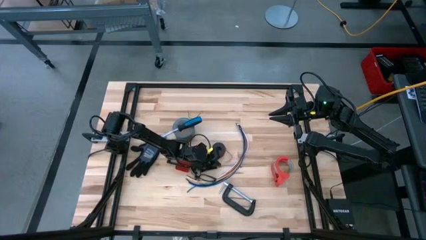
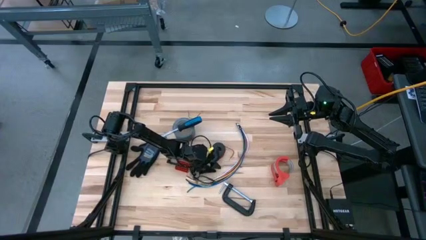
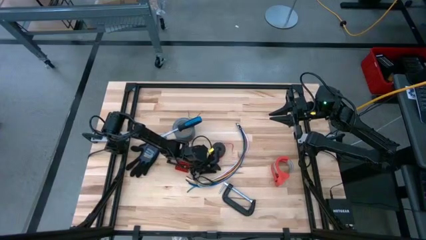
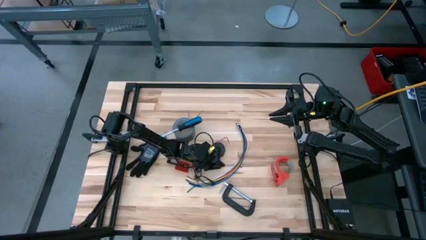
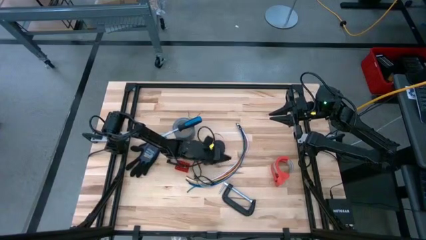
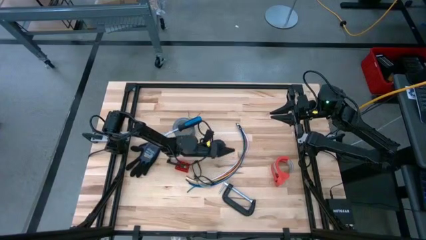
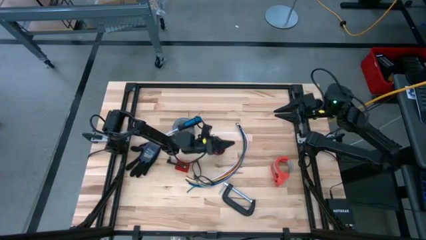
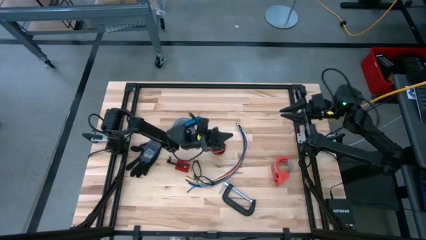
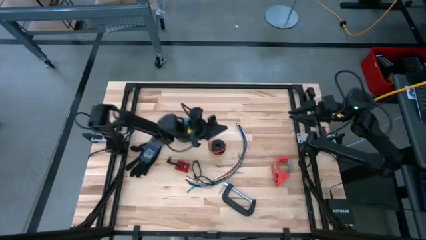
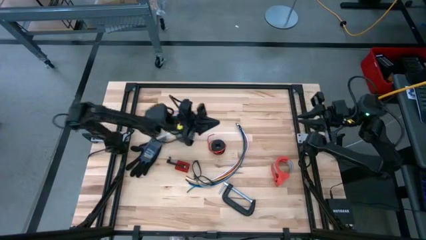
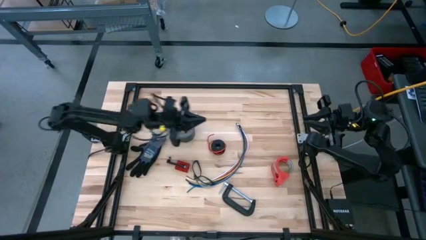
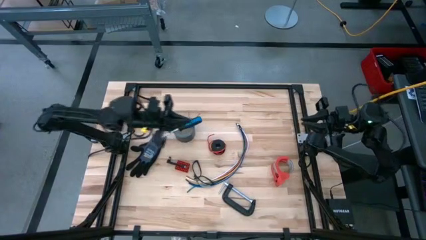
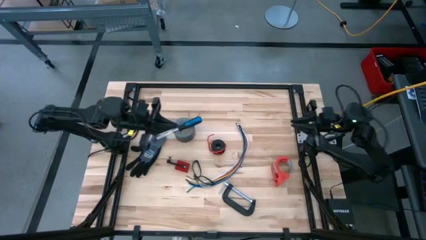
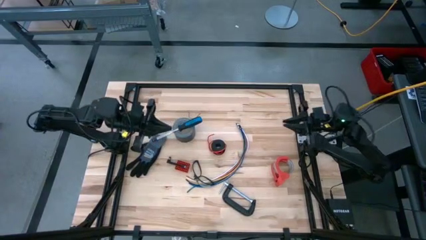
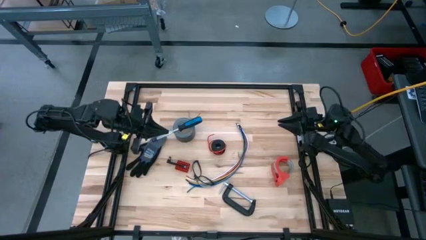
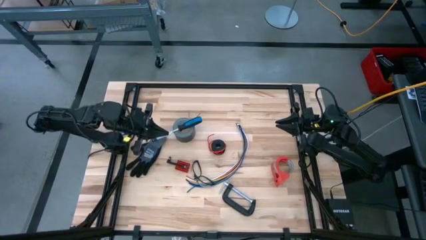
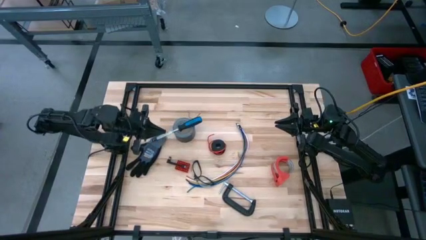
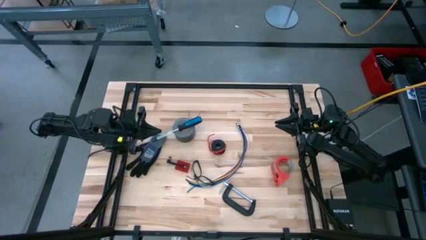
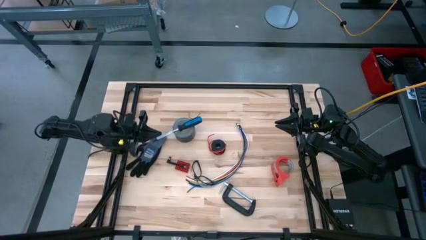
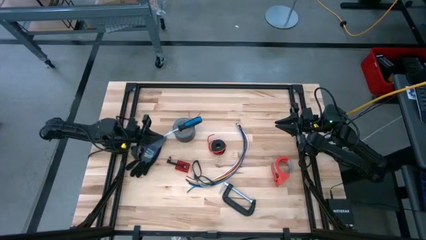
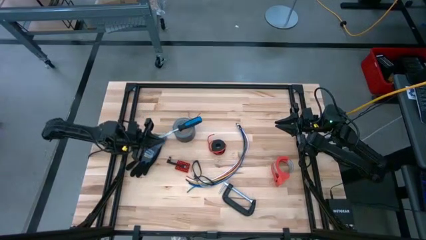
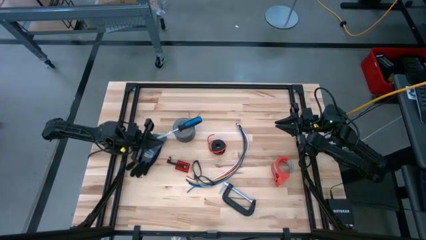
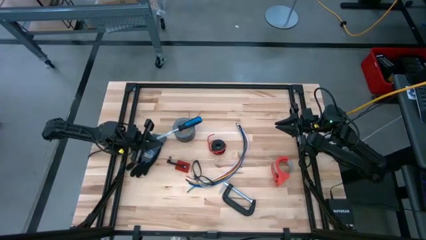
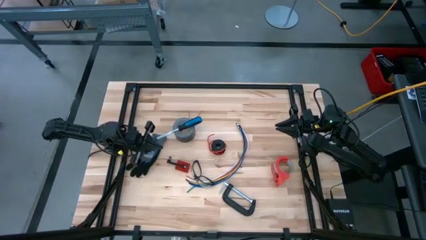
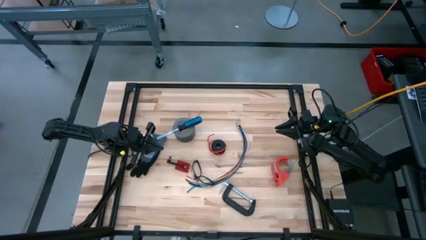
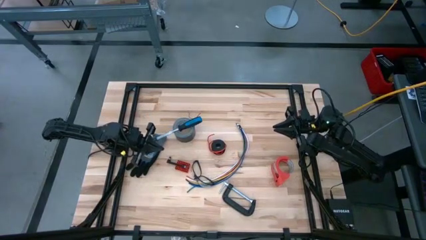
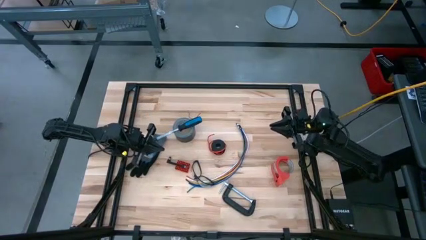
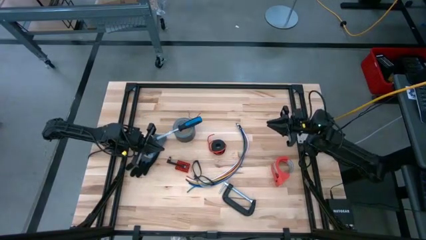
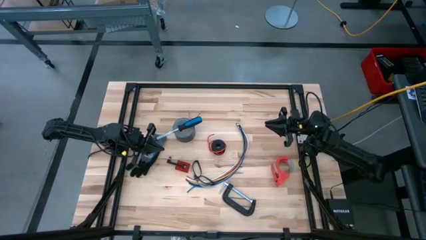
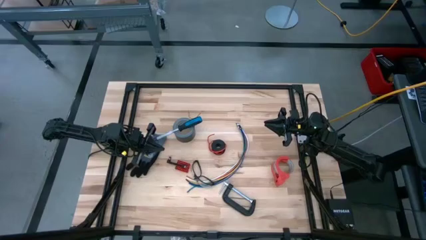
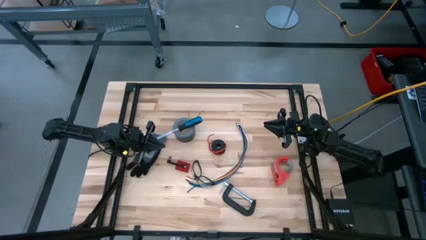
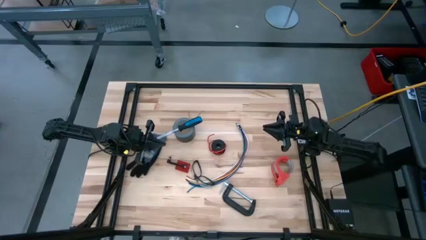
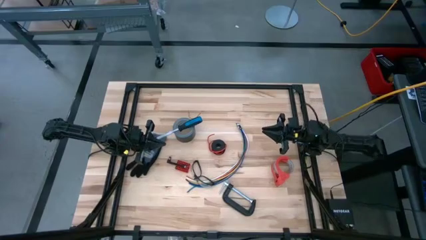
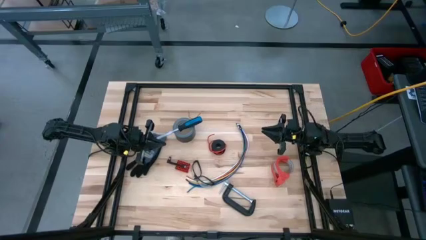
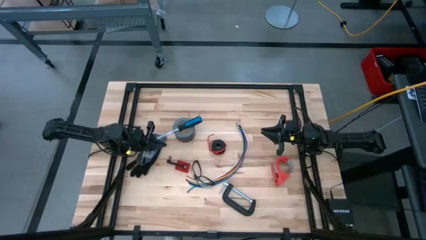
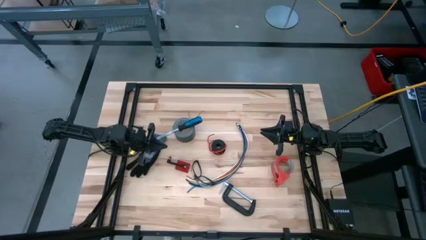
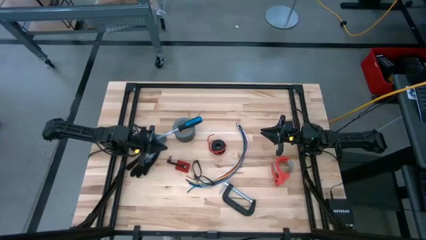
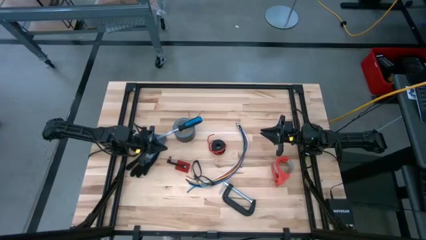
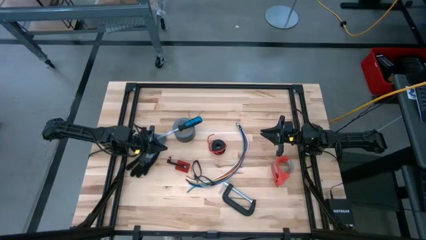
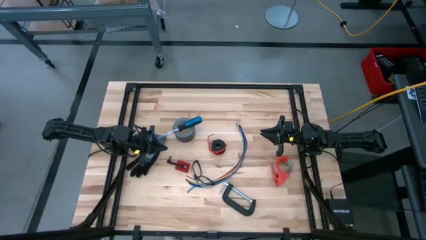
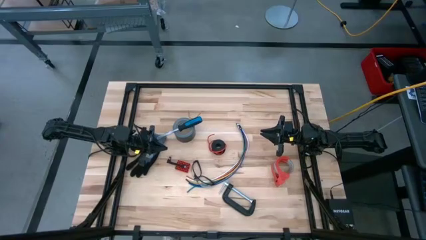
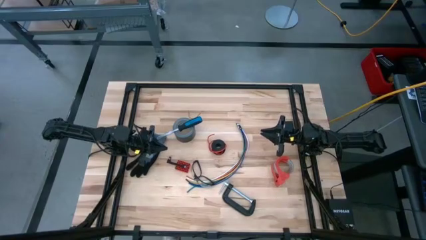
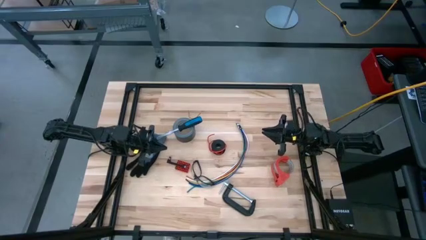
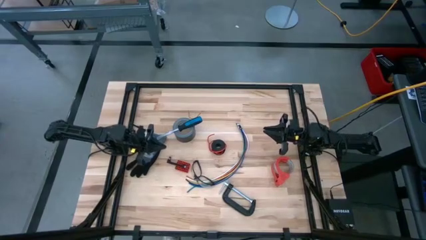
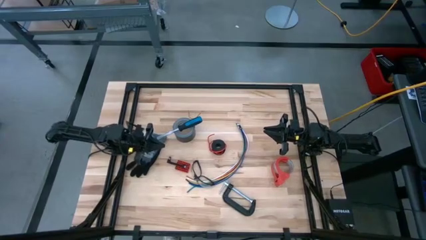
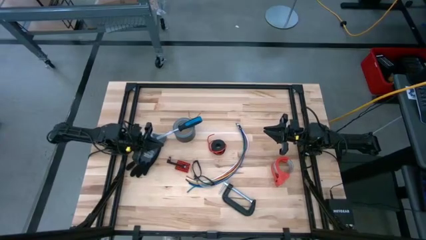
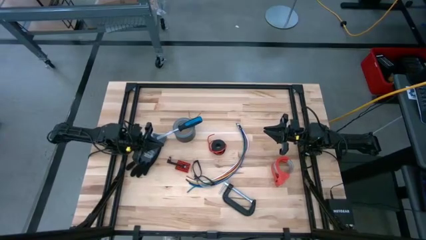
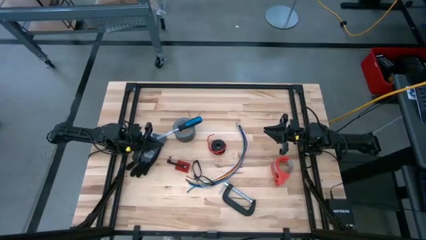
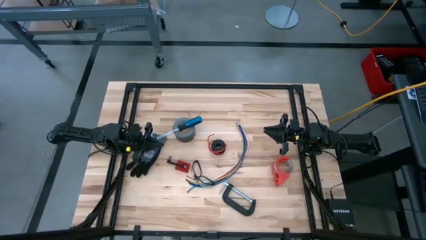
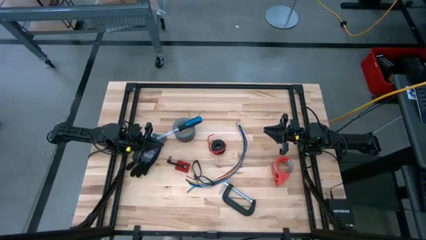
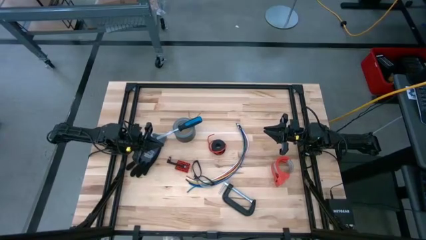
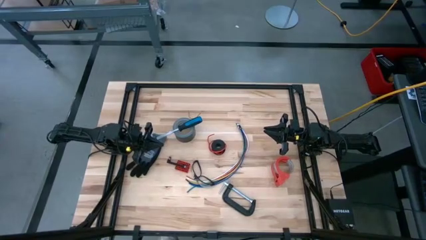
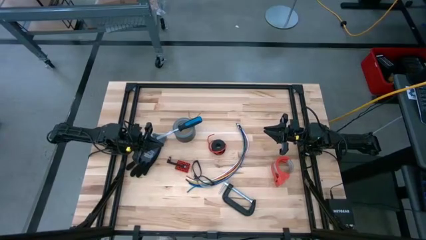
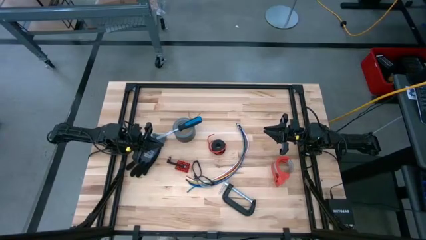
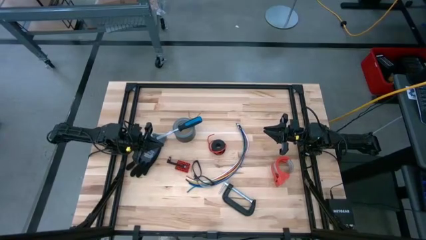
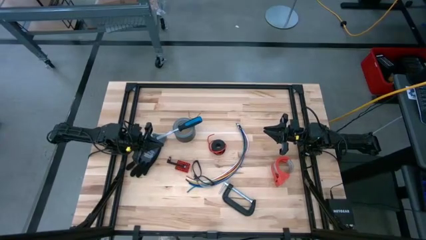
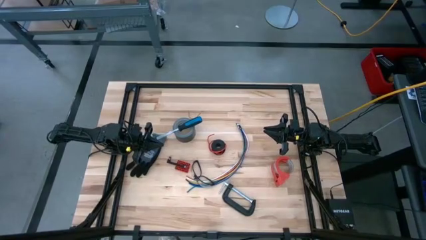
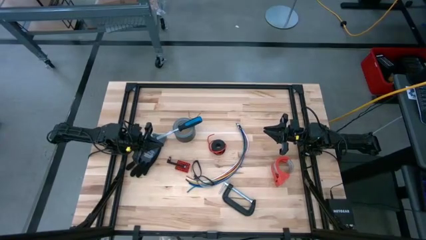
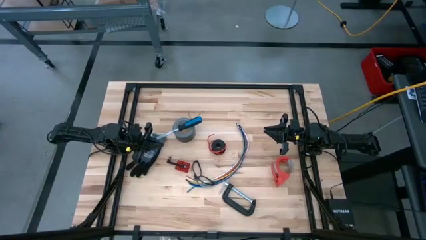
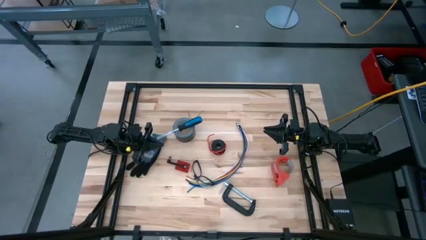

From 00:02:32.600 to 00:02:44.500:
Task: Coil cords
Return to Home Position

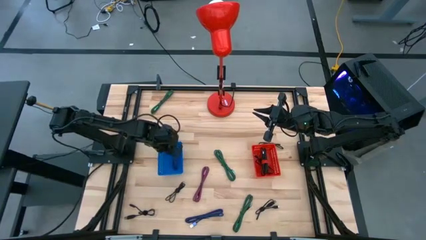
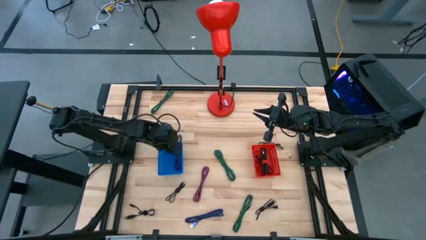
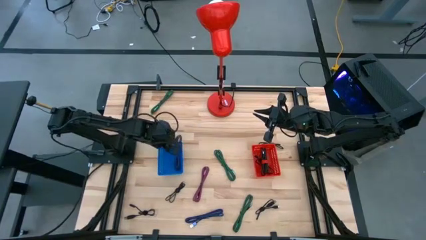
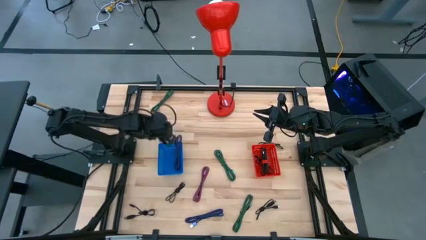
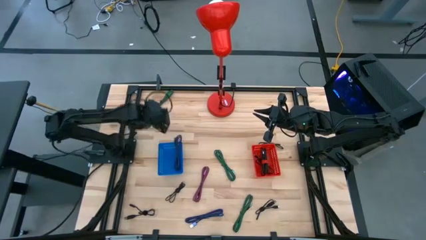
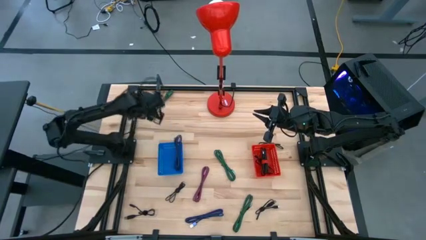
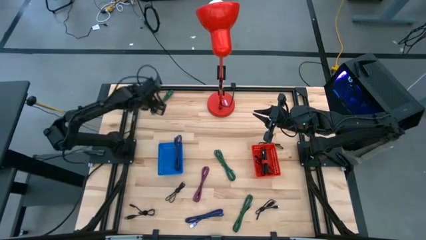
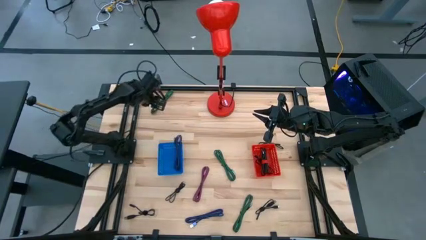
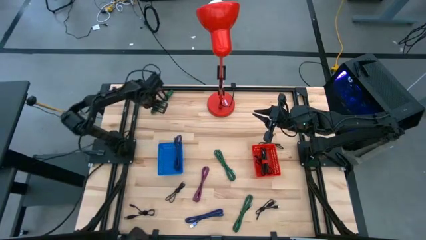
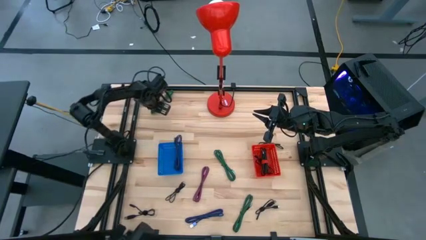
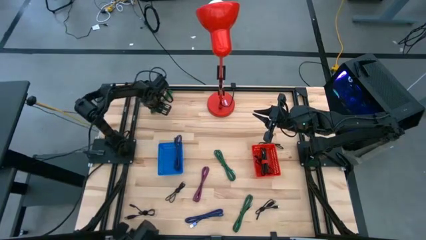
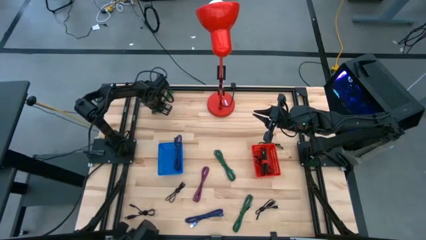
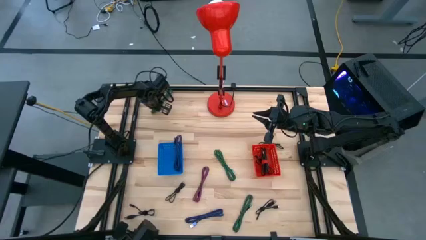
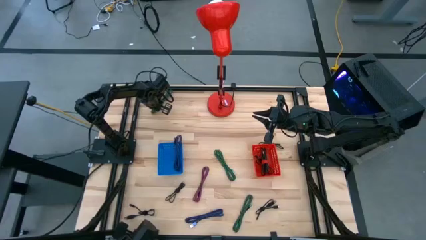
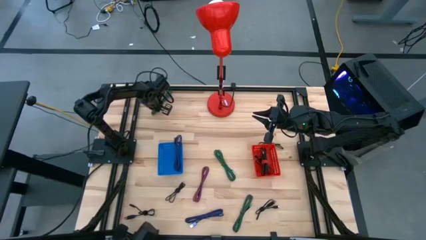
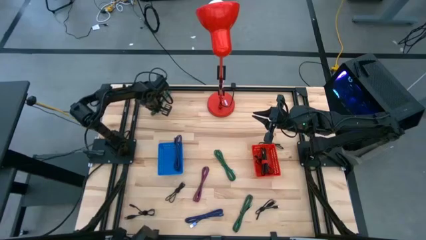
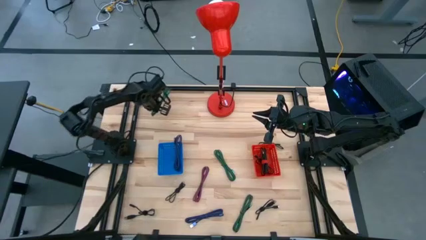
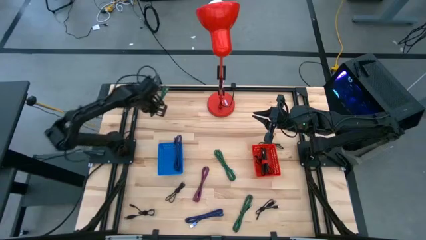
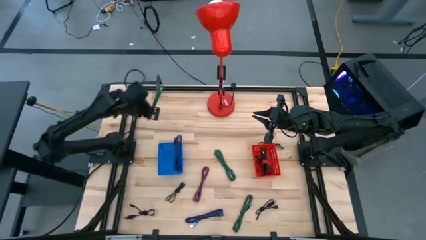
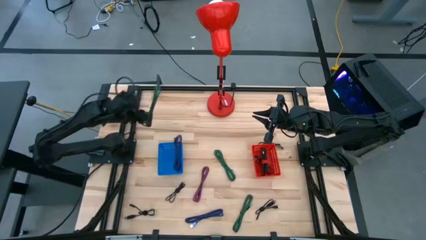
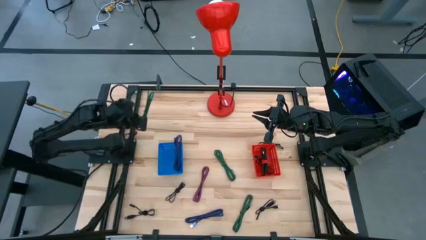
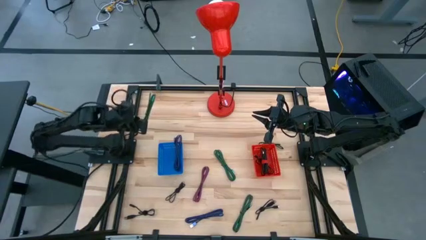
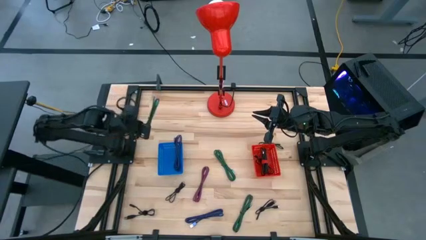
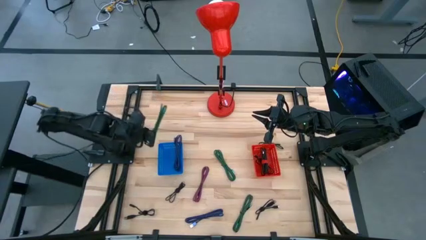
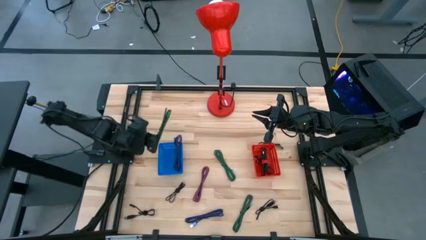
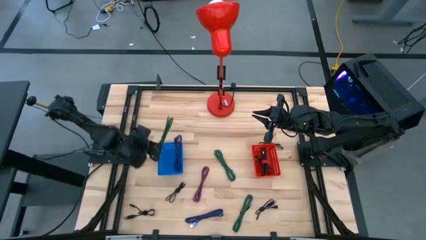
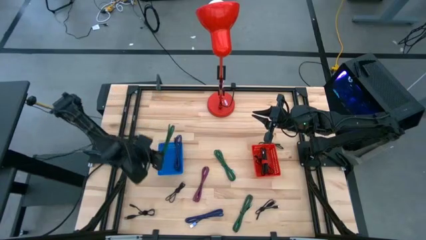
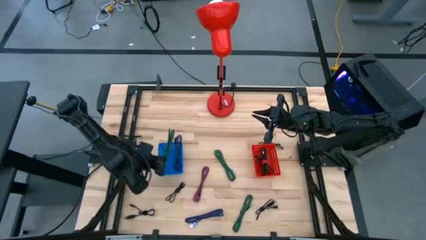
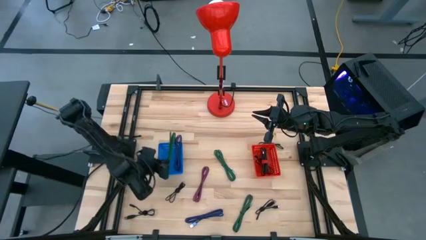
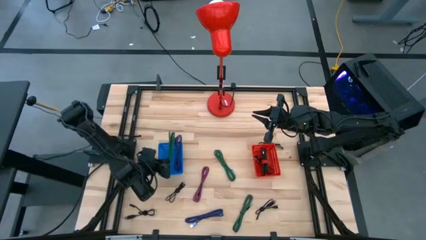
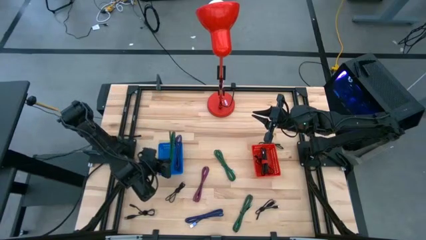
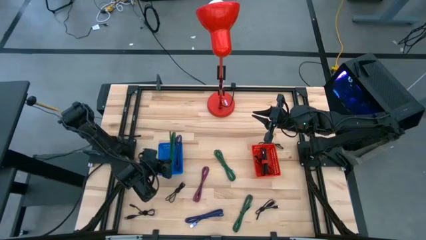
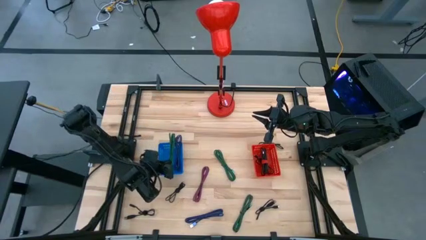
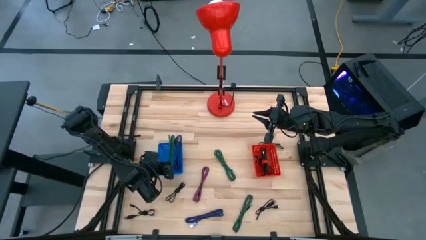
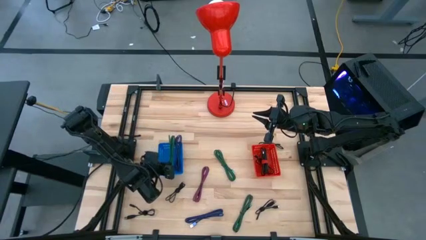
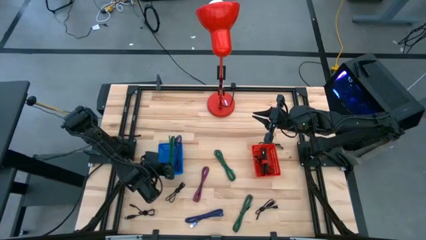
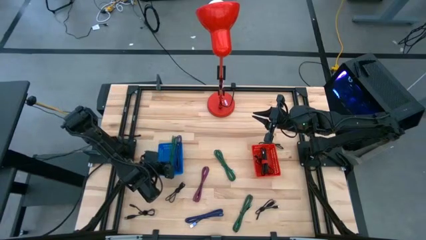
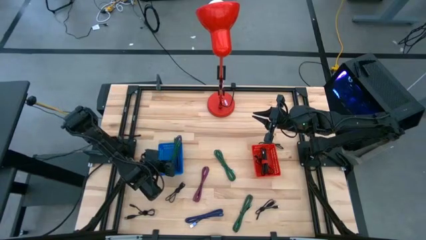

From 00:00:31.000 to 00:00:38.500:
Task: Pick & Place USB Port
Put the green and black charger cable into the blue bin
